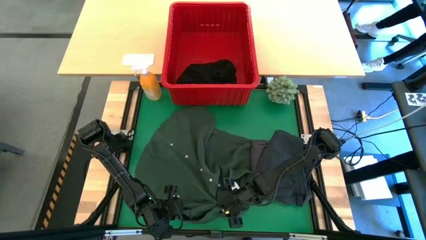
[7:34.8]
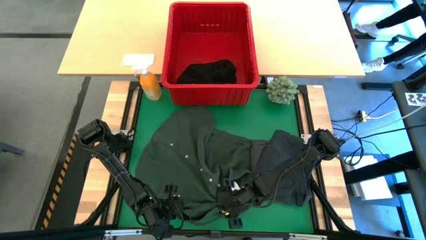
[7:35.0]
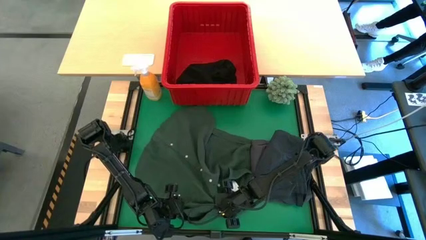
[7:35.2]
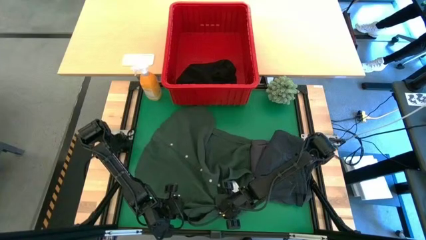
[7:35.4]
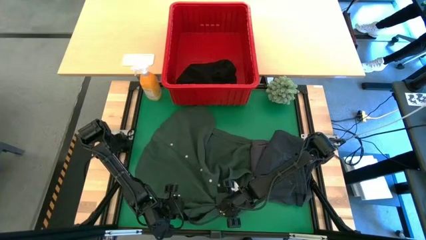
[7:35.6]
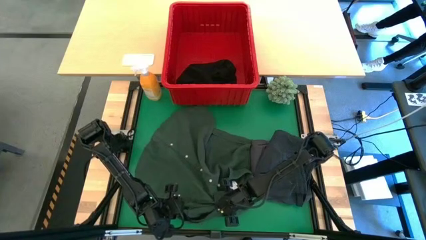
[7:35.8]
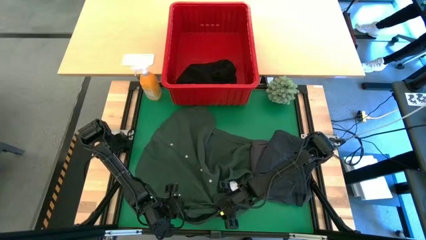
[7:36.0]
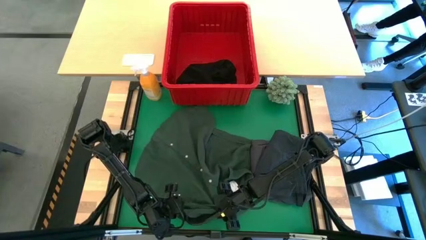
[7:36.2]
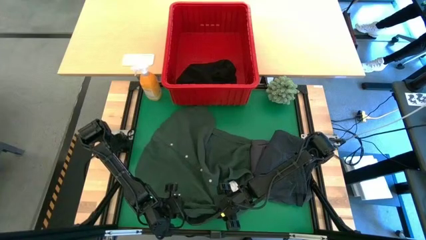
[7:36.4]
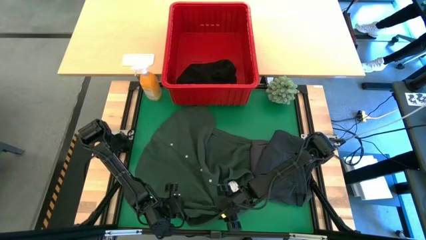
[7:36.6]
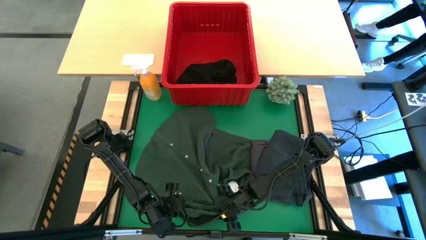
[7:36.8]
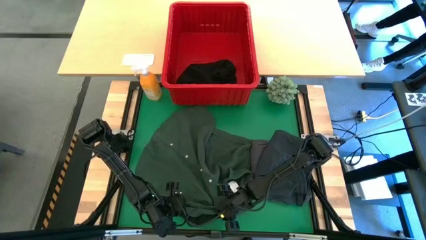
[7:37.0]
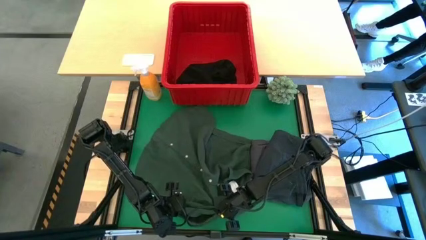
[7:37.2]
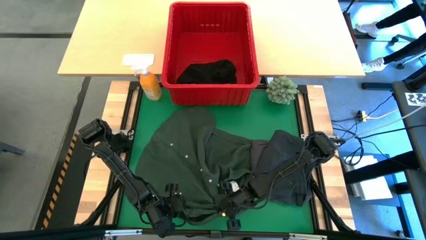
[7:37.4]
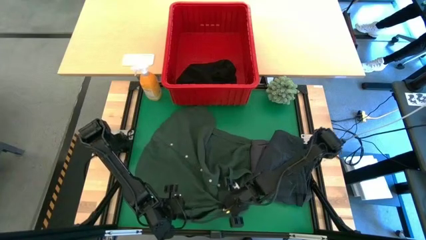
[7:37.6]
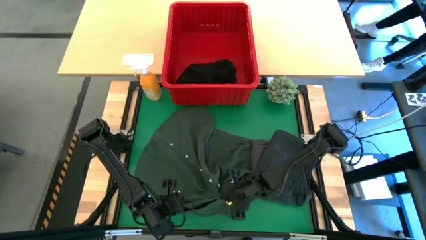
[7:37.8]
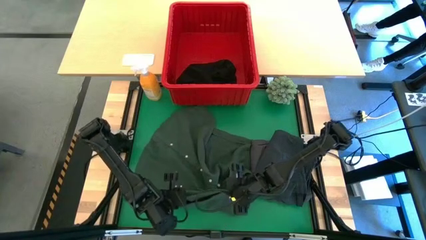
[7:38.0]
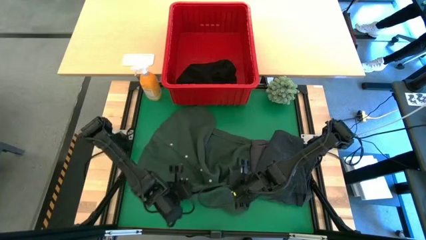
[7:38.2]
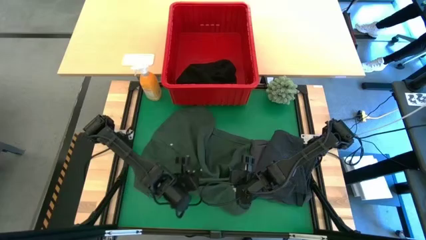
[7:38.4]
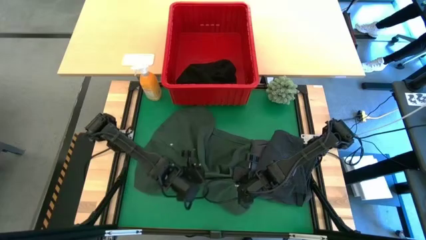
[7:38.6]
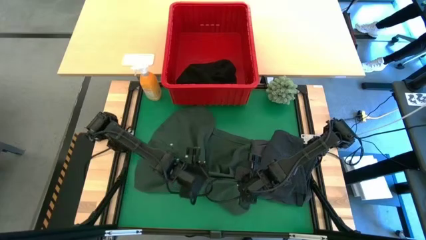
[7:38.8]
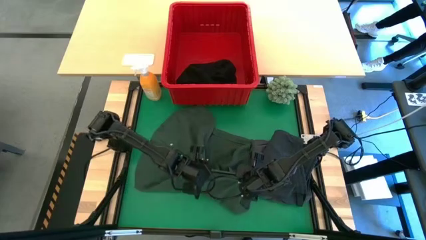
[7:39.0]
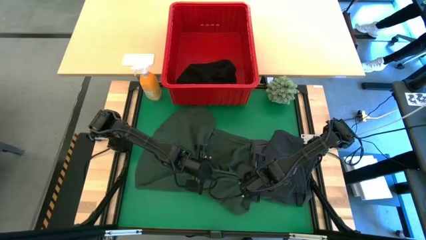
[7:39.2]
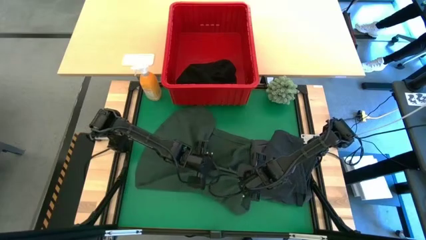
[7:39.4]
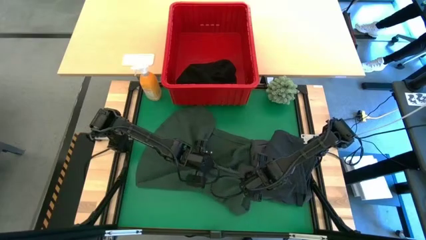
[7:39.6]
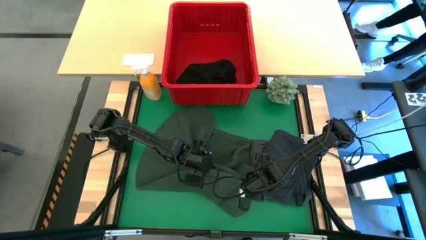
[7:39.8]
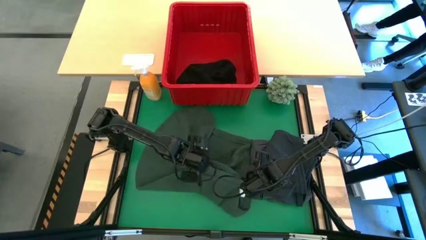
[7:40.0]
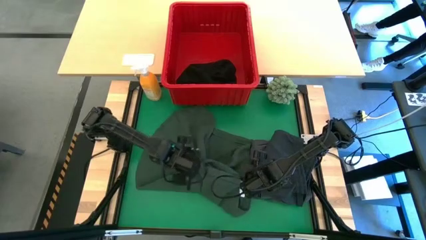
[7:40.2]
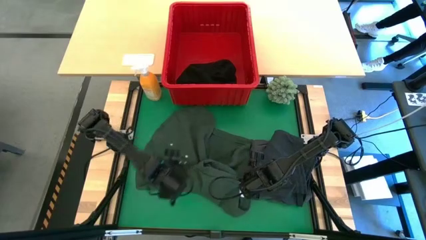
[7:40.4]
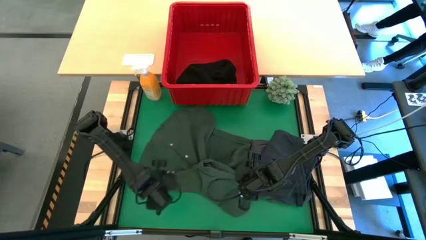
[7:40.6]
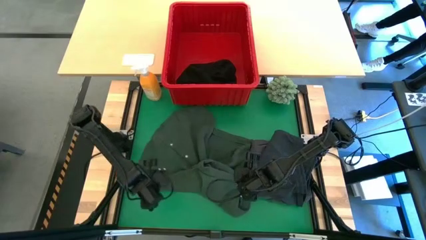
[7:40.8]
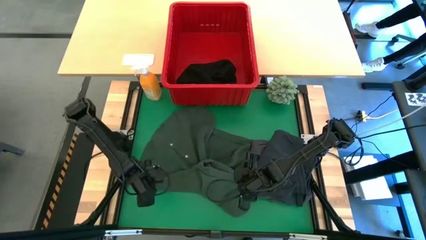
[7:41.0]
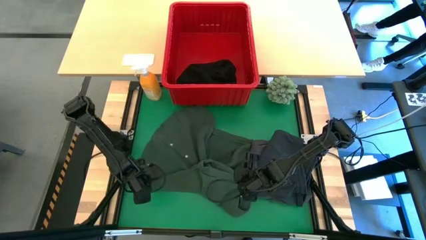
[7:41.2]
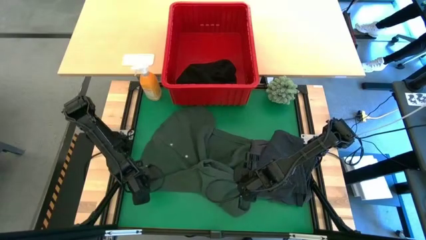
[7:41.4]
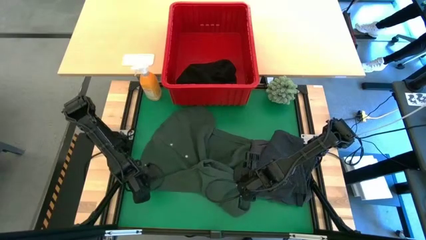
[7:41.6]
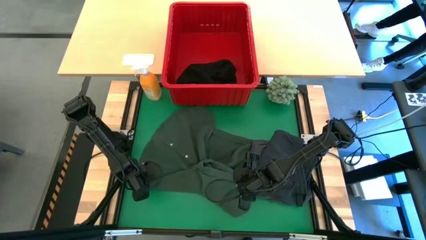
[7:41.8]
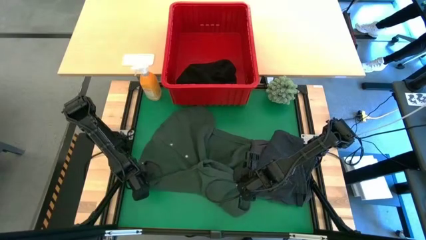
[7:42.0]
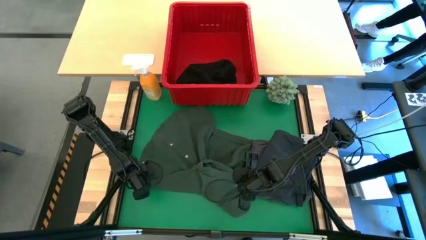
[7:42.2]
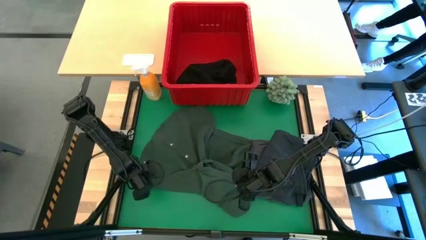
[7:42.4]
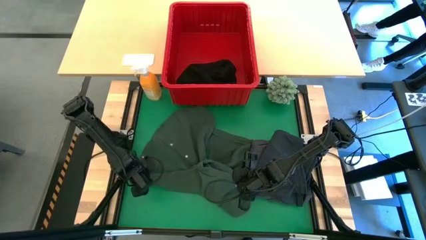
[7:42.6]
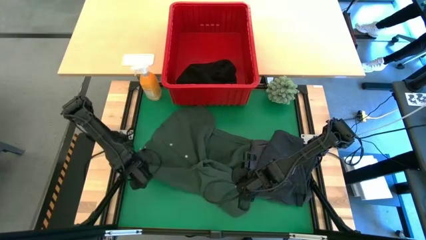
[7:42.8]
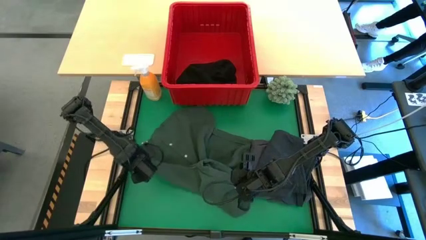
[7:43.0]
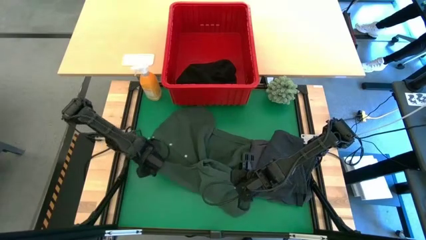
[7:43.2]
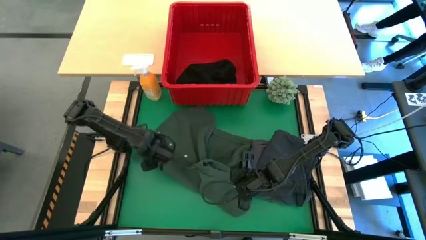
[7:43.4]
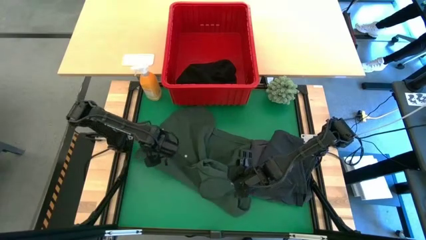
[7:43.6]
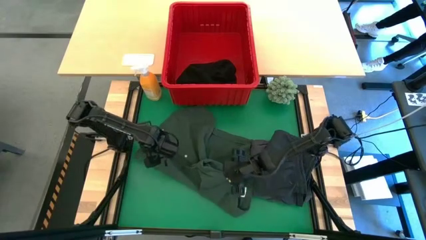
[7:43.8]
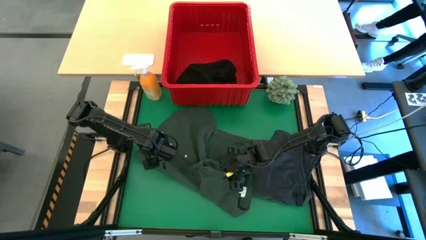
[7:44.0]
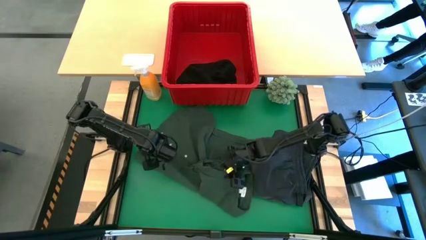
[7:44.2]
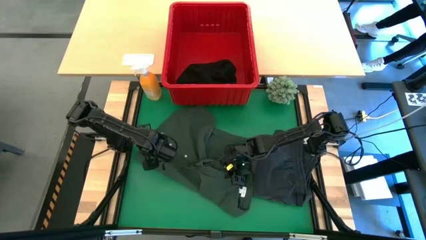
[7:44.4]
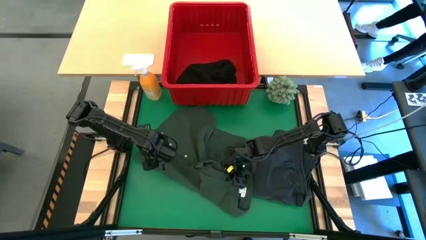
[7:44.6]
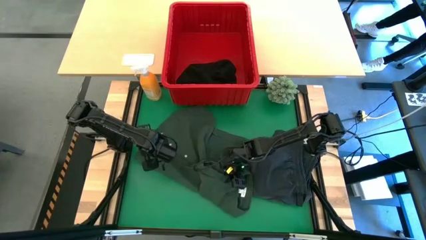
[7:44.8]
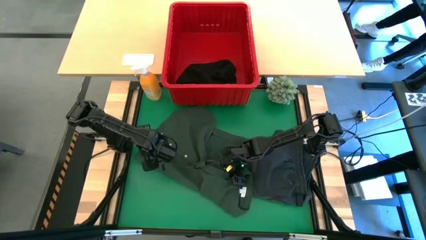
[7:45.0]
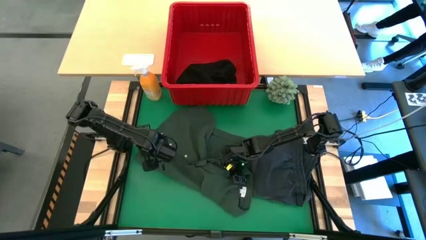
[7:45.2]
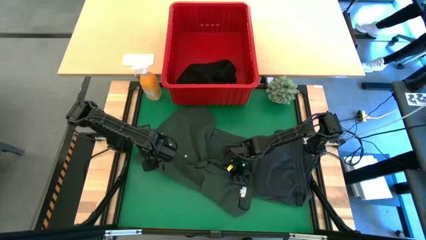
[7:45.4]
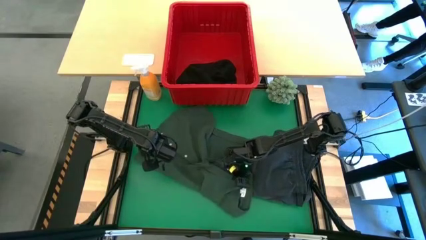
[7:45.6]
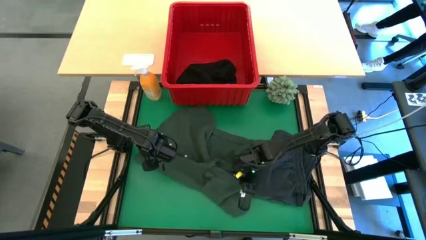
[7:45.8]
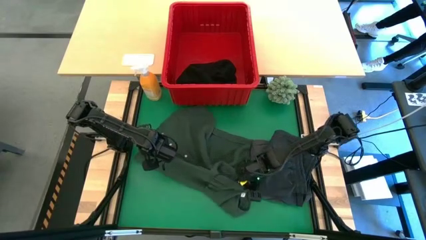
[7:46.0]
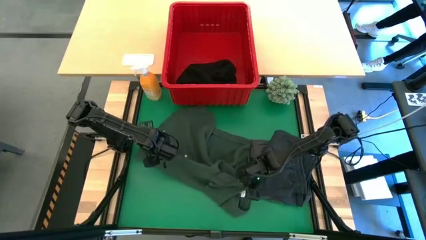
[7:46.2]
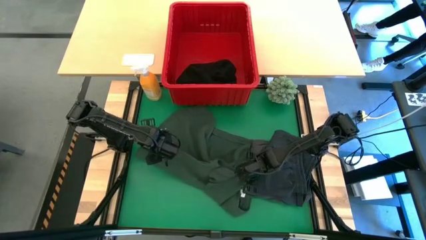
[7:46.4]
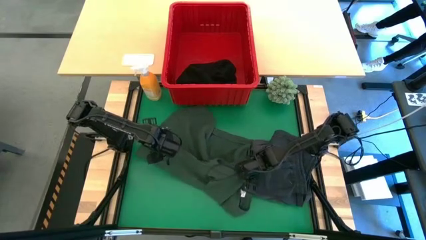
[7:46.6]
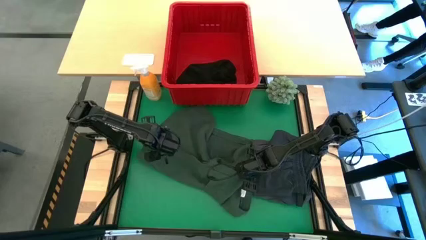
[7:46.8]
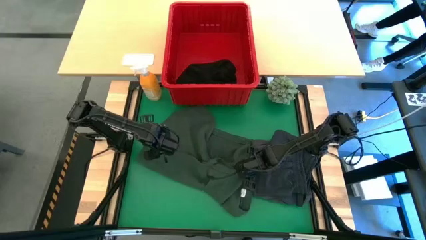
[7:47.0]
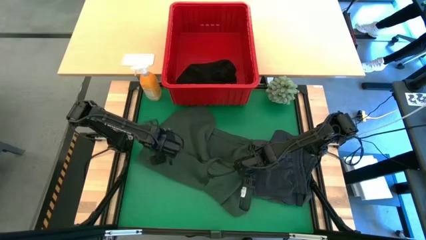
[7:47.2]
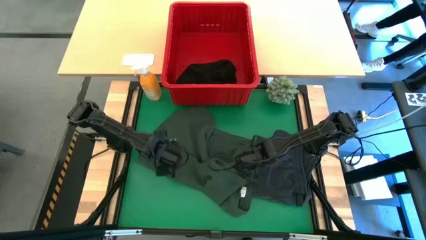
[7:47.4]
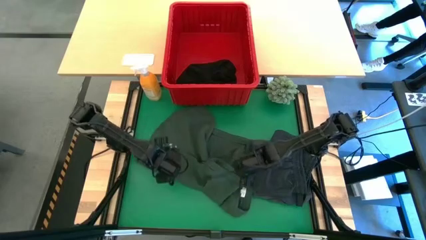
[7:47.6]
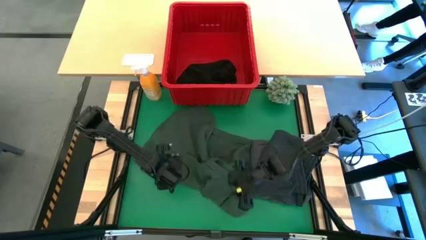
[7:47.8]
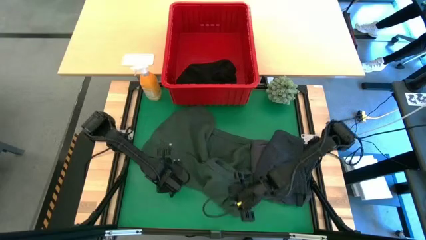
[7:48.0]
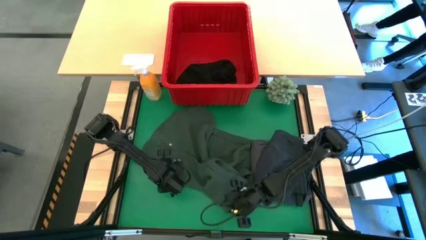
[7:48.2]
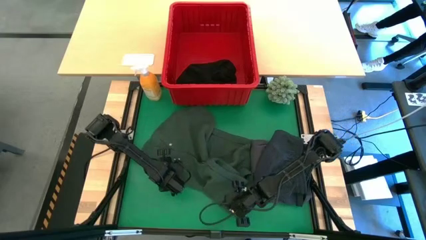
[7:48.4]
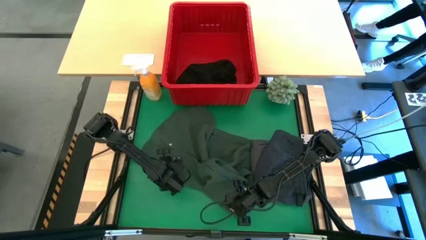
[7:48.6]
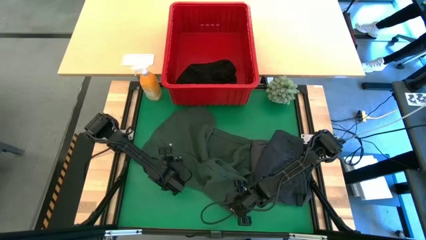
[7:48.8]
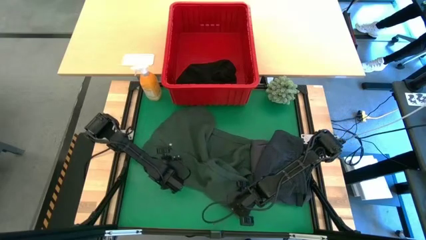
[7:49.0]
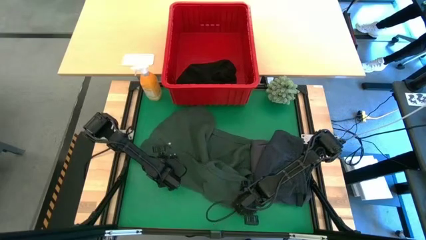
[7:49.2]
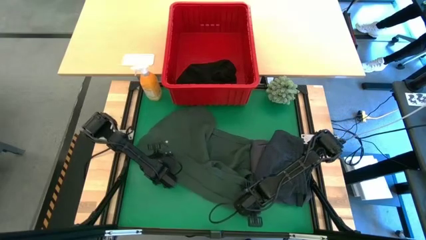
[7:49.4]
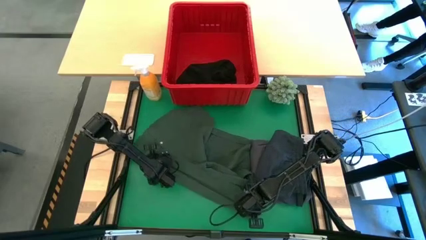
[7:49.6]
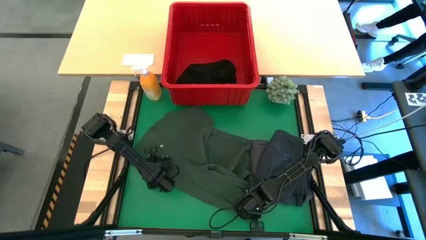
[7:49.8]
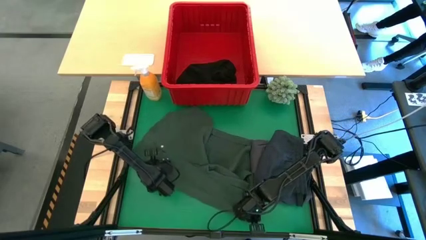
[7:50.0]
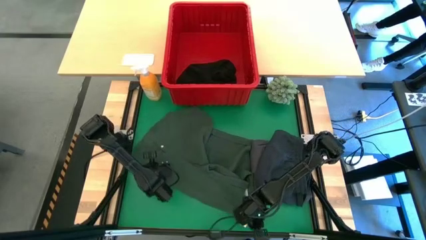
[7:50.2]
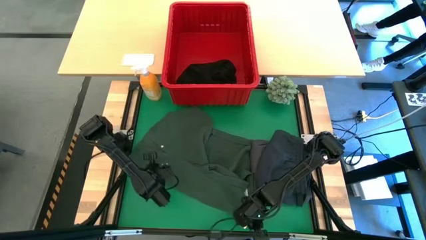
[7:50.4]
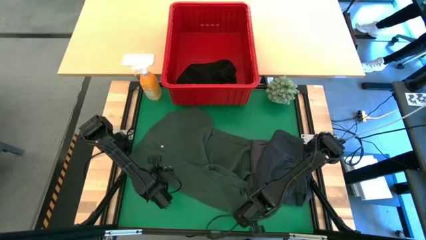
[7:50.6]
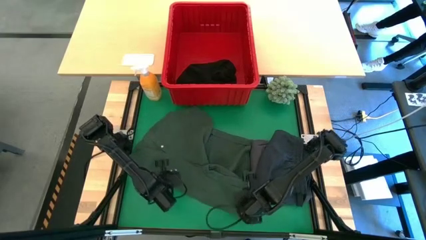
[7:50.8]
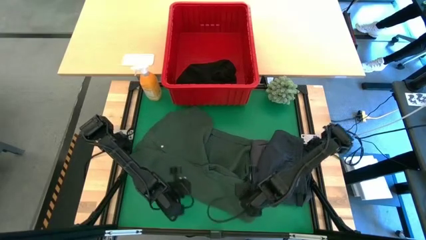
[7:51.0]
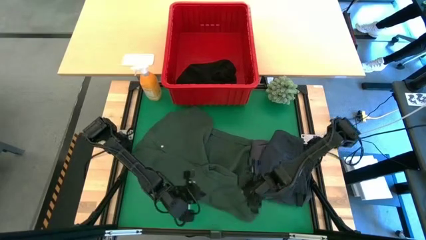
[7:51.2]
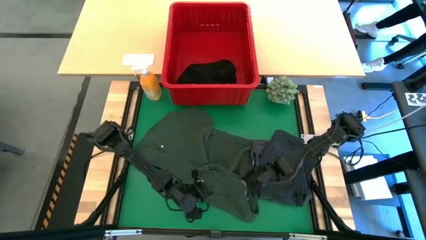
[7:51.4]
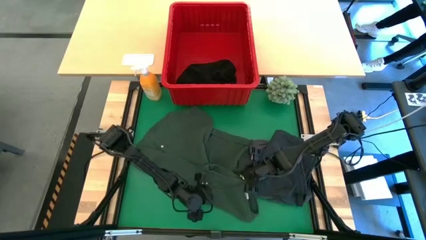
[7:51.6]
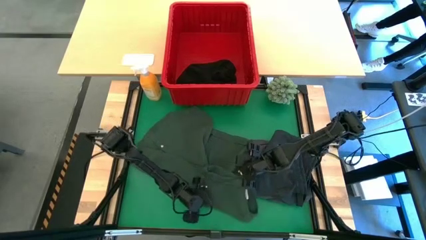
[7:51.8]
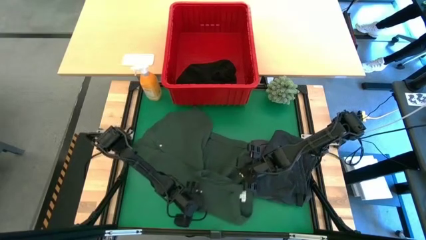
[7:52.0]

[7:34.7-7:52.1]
Task: Fold Laundry from Bin
Fold the green polo
